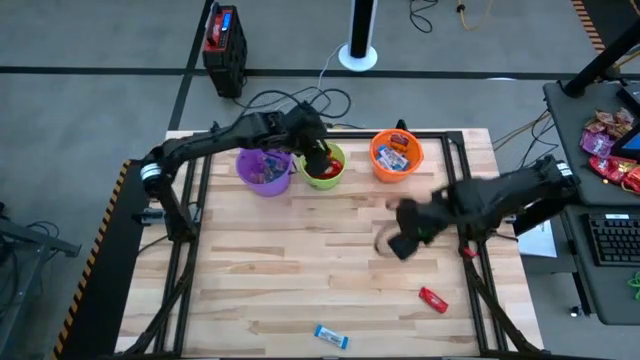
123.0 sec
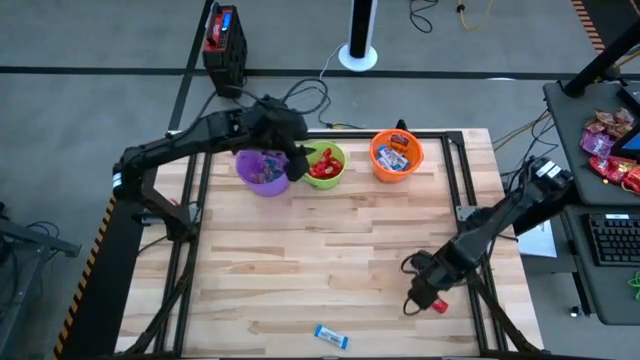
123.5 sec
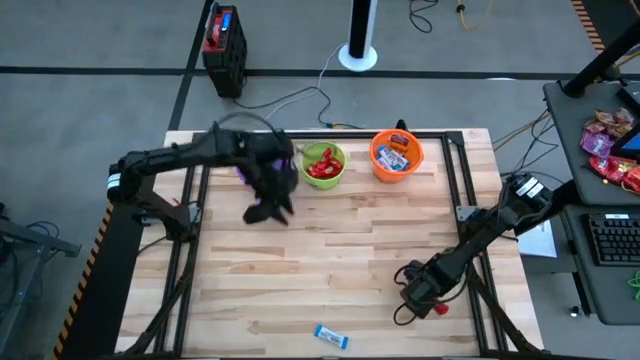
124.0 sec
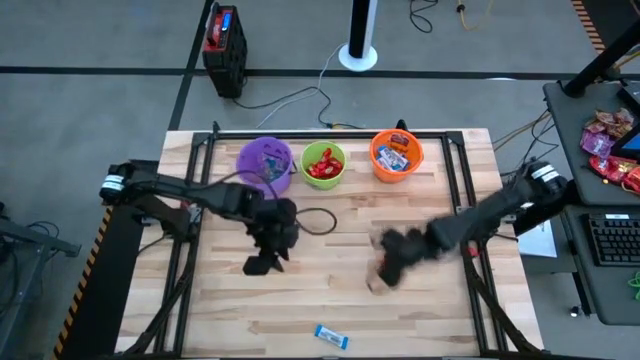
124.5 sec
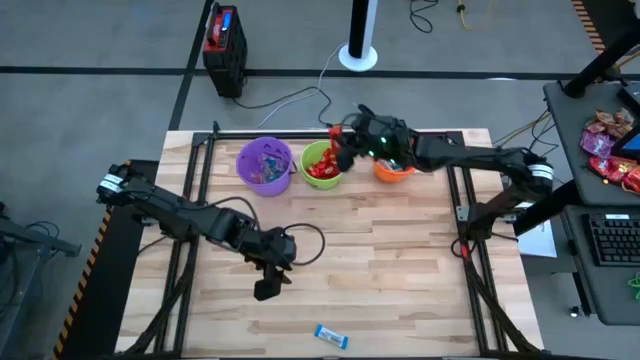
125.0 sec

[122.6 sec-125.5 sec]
Task: Sort candy by brand, put in halloween buckets
Put the red chocolate bar into the green bucket

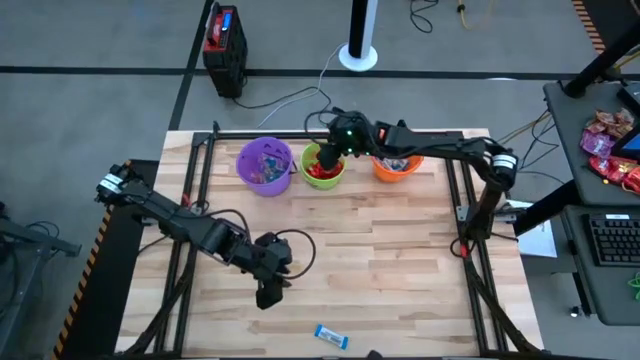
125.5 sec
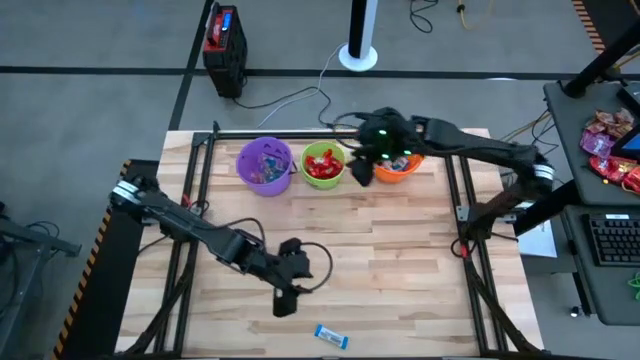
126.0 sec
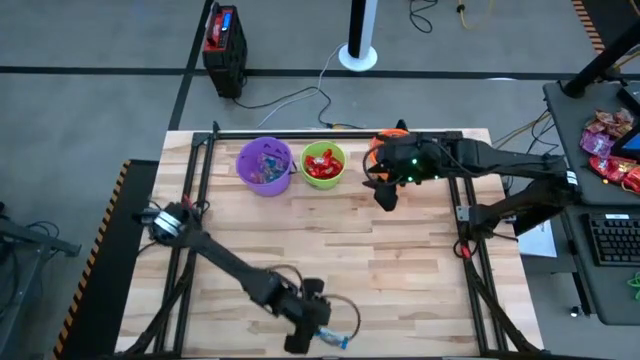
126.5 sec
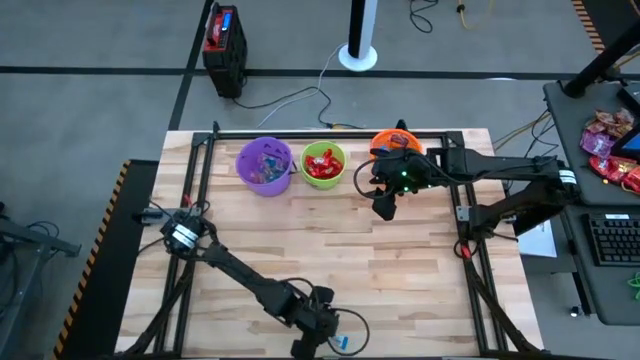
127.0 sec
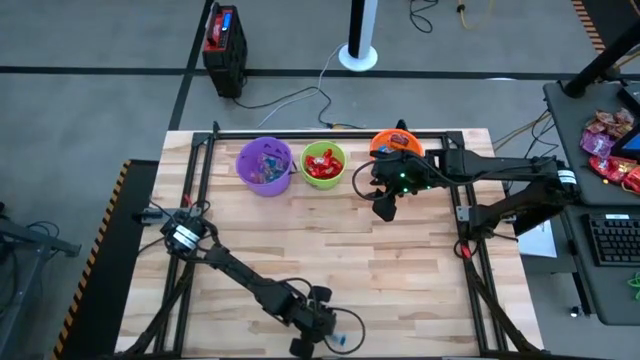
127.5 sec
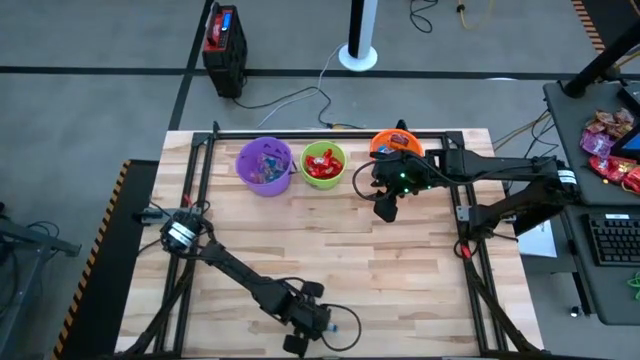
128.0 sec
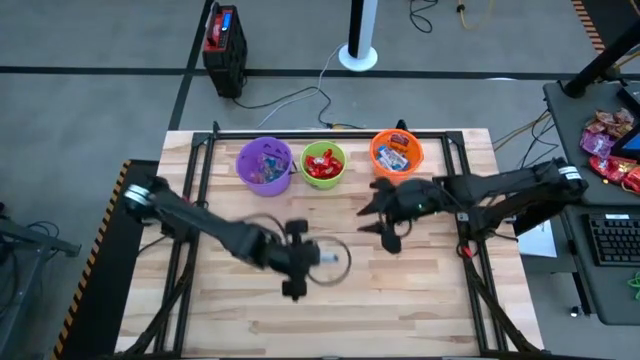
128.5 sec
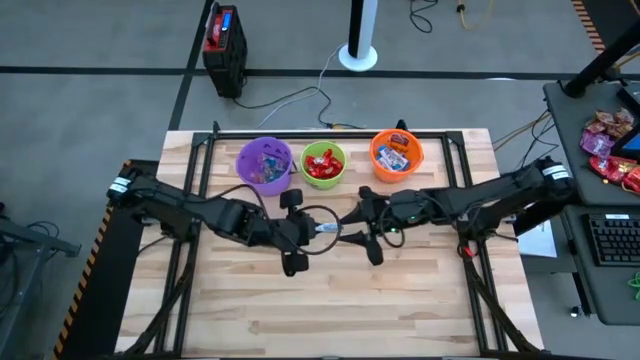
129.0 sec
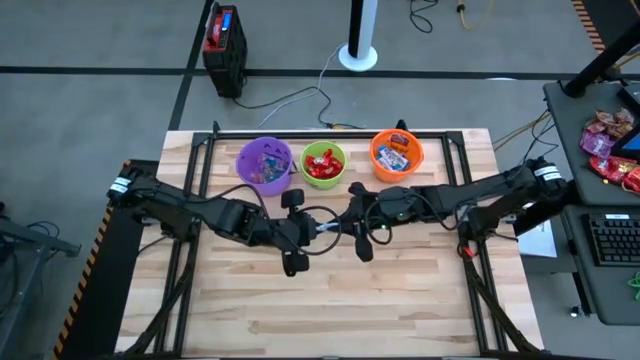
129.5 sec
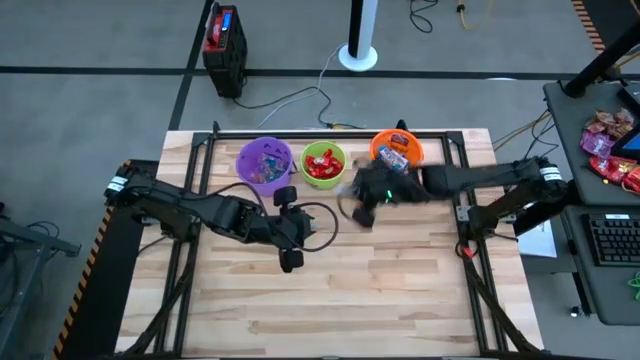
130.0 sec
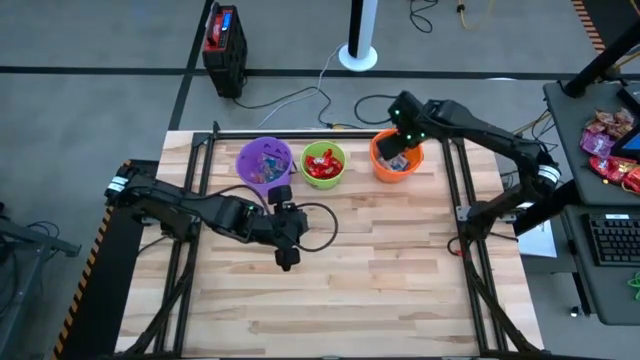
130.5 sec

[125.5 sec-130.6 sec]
Put the white chocolate bar into the orange bucket

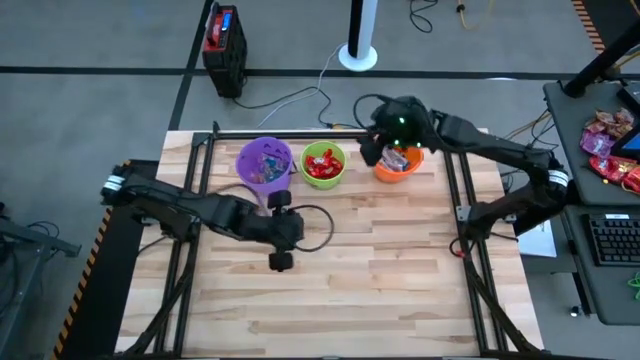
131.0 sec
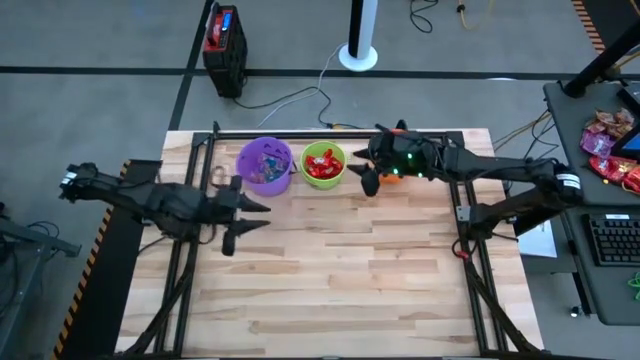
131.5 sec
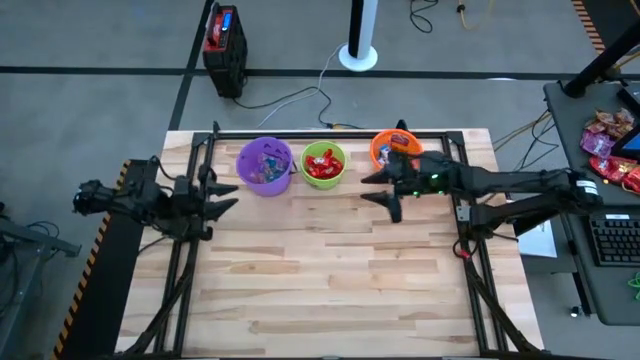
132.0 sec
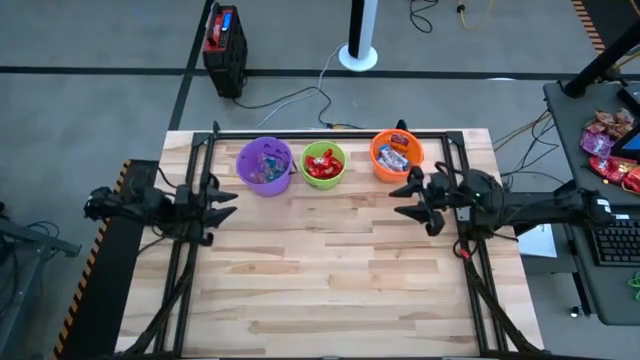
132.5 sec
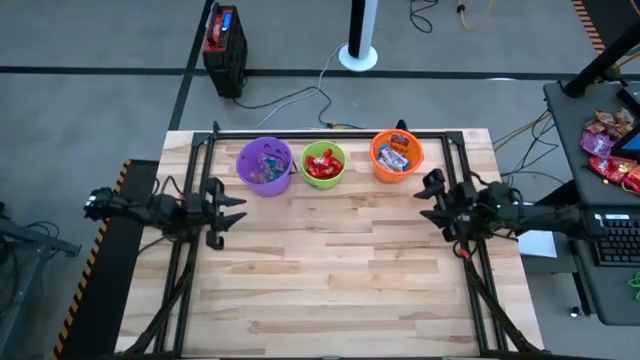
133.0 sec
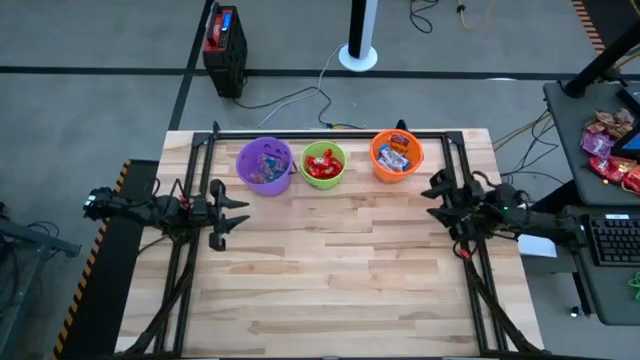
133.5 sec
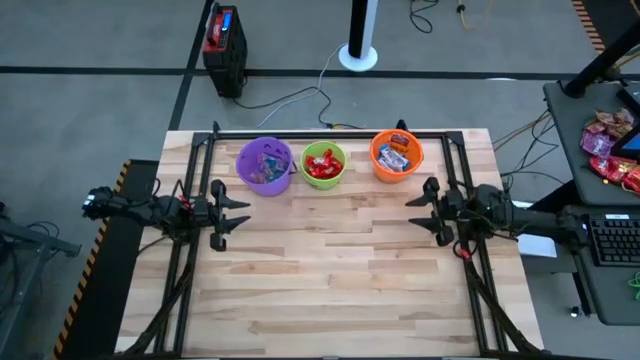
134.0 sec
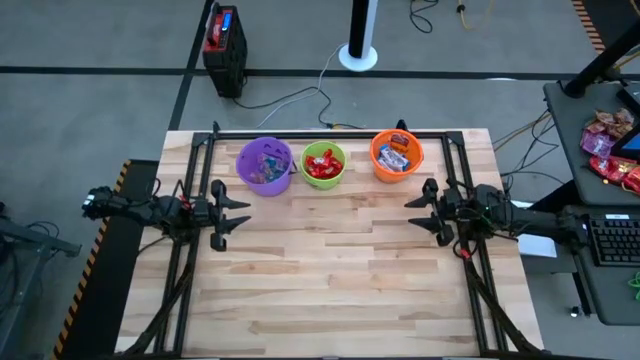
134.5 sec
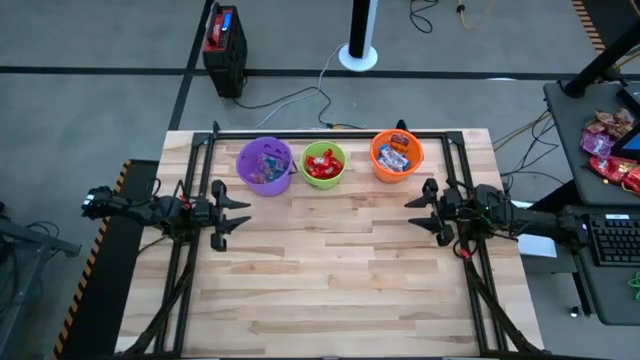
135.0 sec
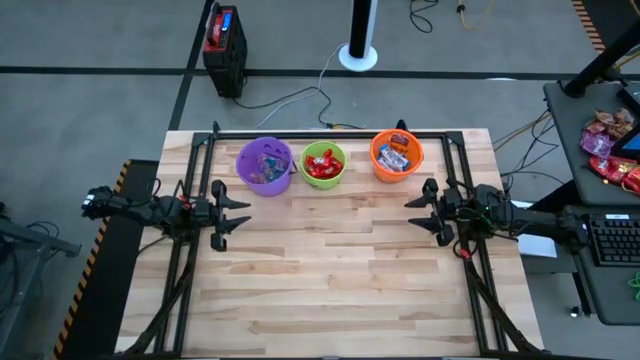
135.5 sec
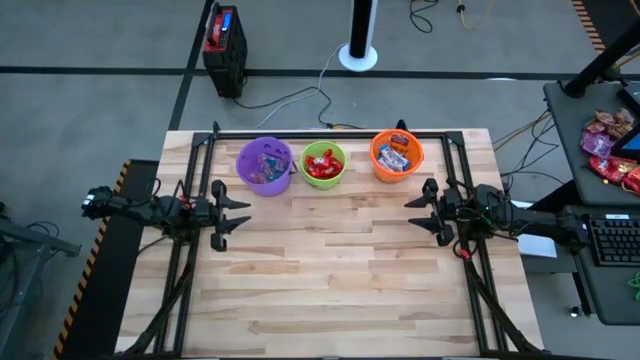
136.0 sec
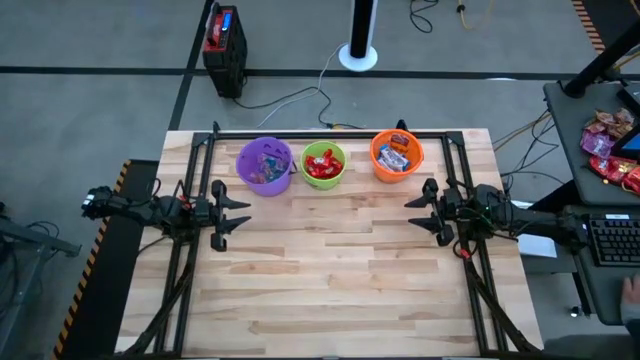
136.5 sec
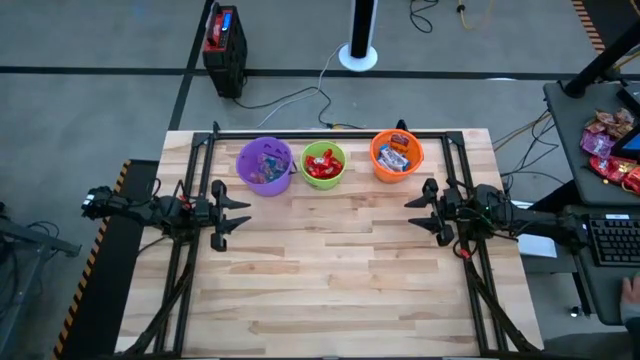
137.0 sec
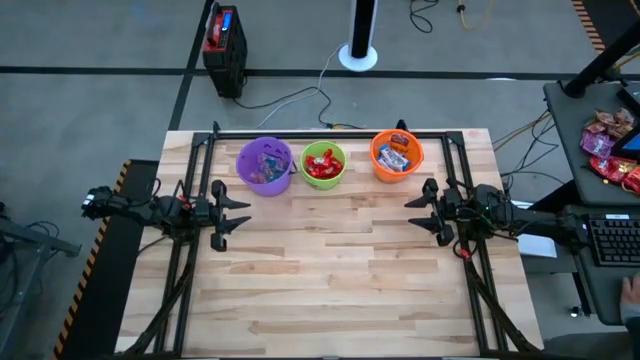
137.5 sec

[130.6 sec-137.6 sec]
Return to Home Position

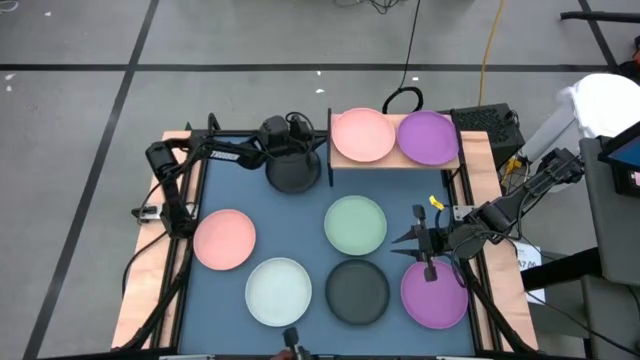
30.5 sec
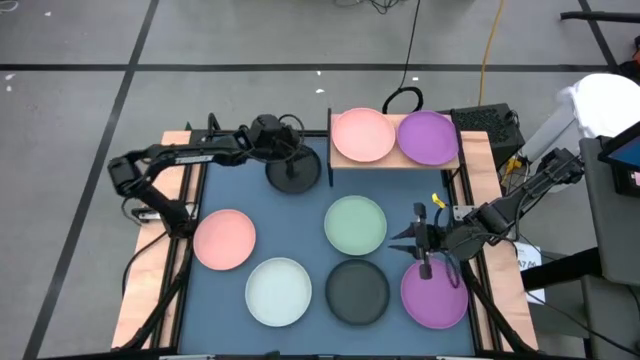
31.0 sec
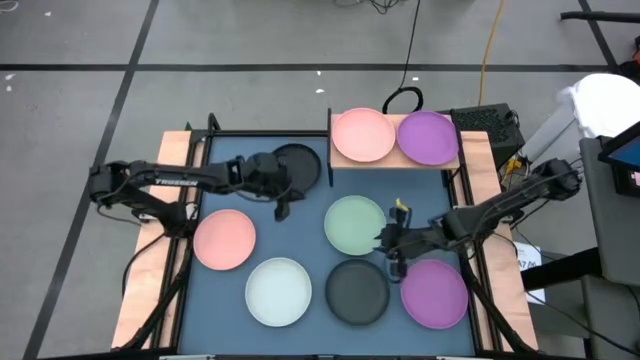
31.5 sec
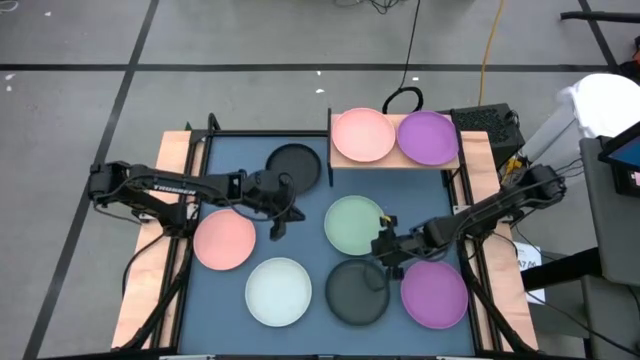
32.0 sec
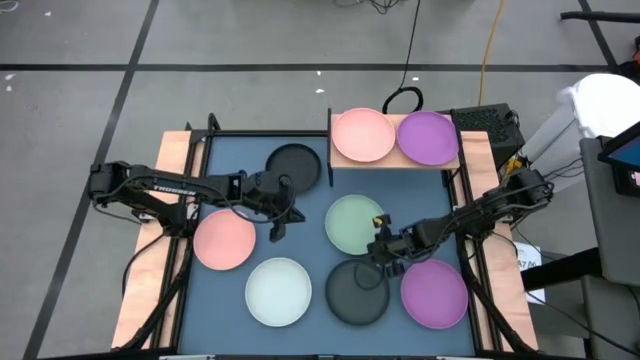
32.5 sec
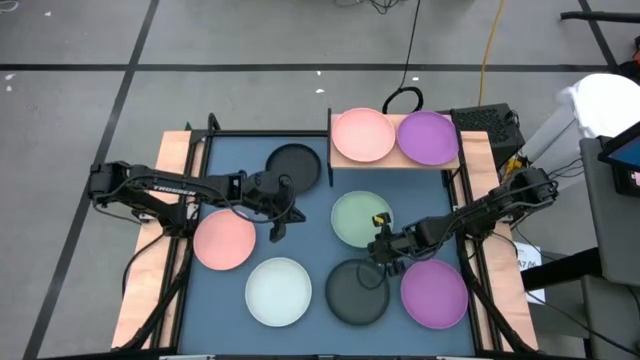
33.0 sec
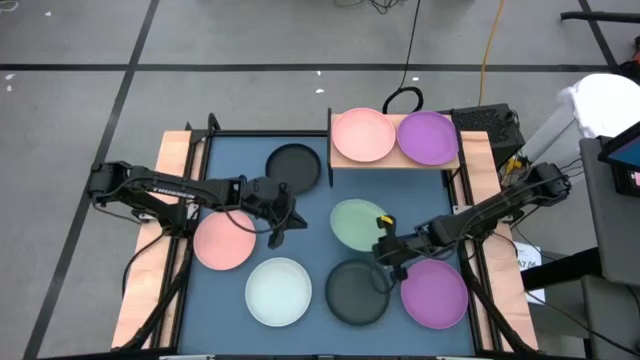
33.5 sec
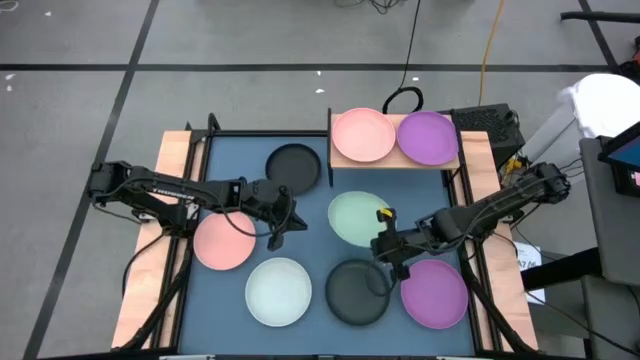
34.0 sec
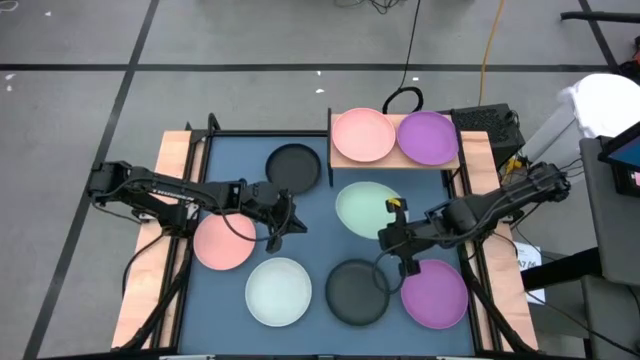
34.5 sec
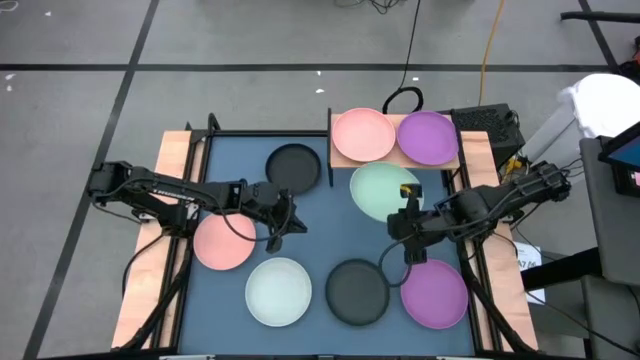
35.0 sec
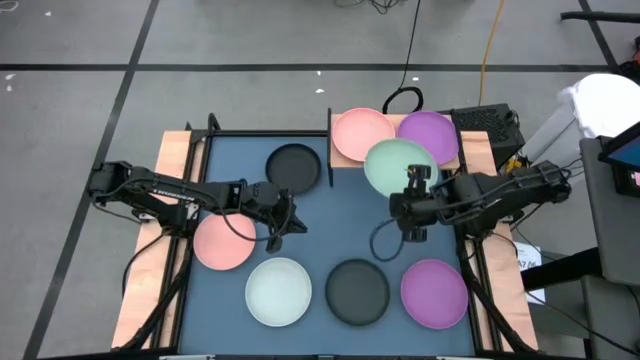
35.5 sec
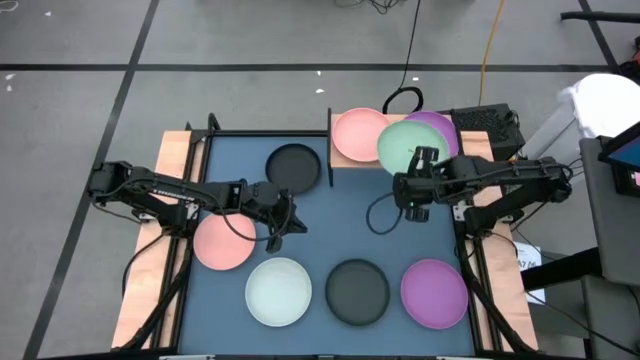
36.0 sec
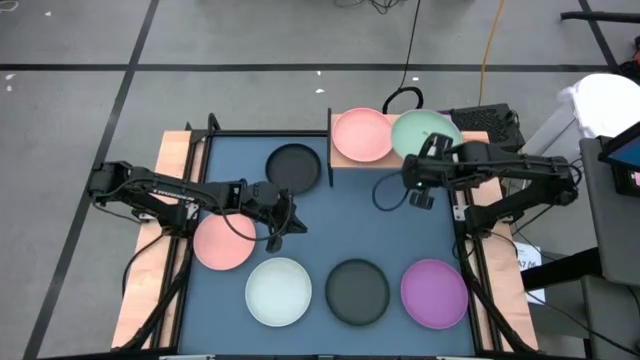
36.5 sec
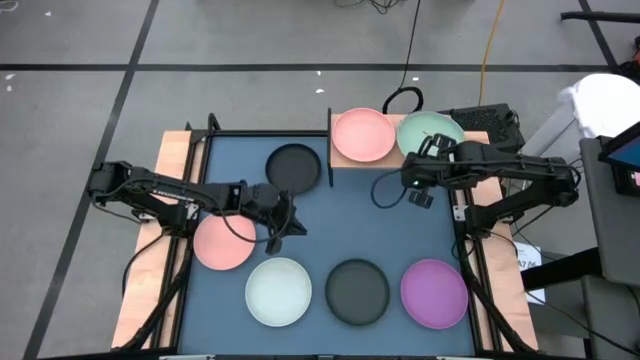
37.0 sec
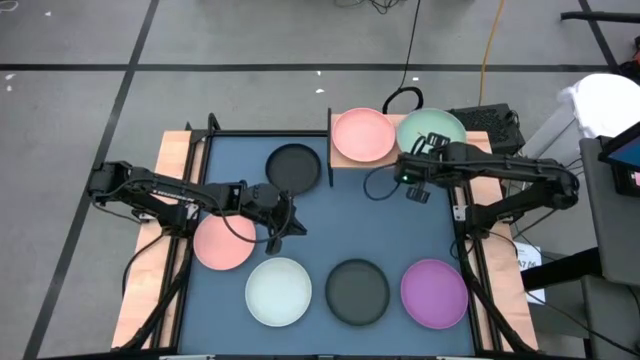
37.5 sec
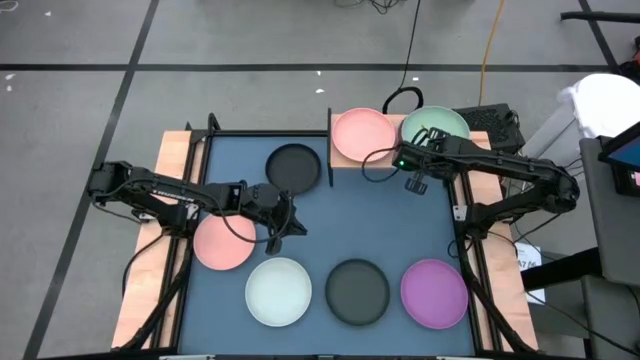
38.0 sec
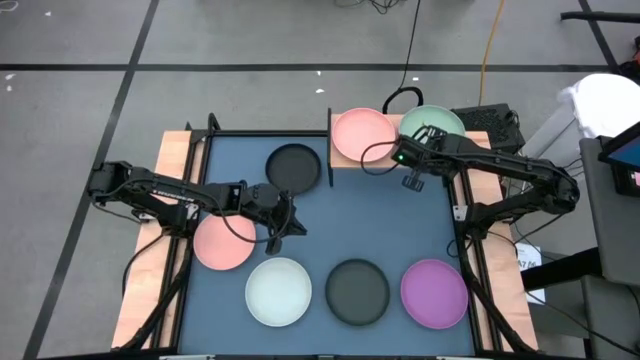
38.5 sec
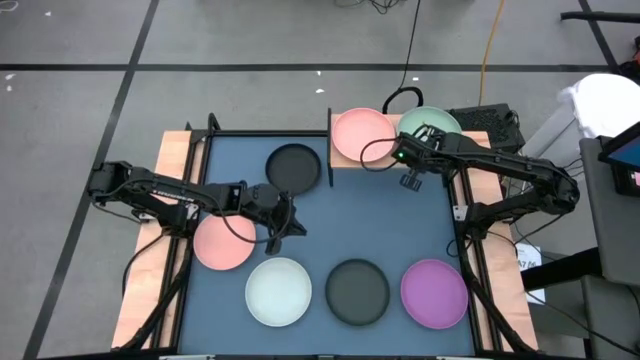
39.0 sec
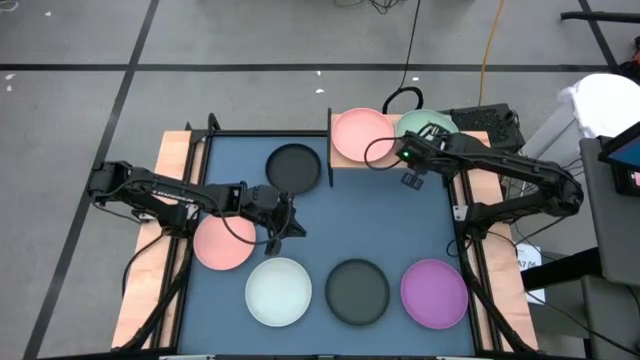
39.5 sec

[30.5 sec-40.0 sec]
Task: Place and stack plates onto a shelf
Stack the green plate on top of the purple plate on the shelf
